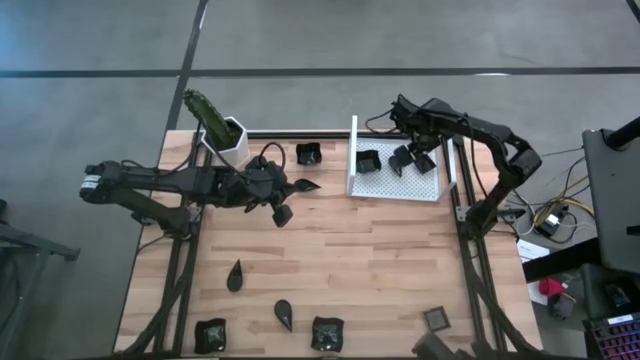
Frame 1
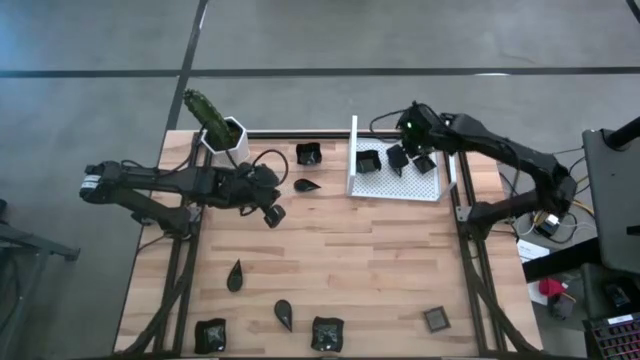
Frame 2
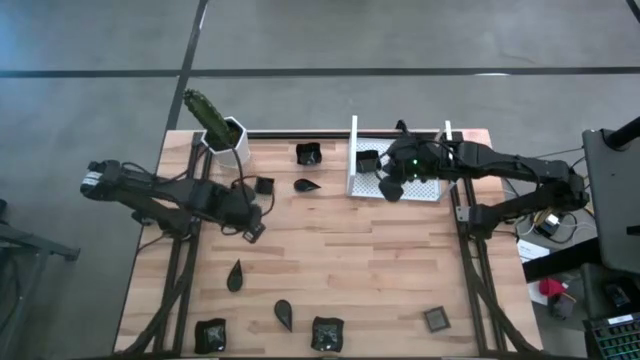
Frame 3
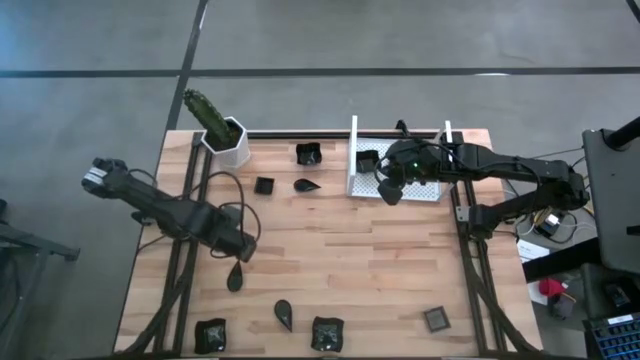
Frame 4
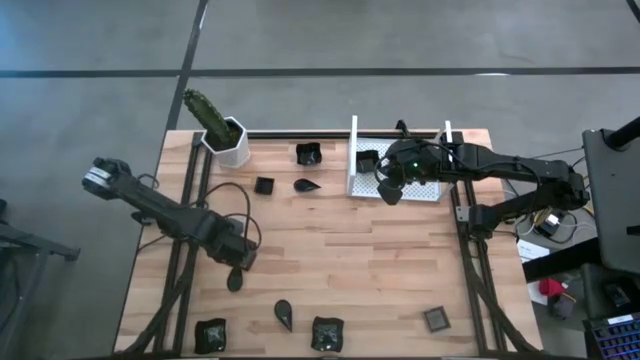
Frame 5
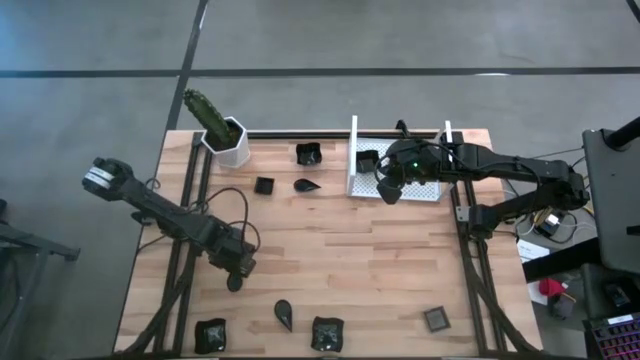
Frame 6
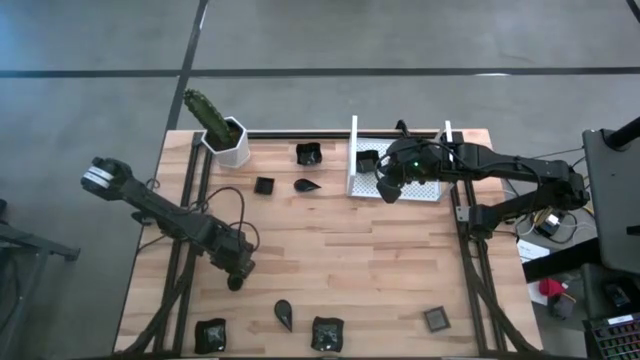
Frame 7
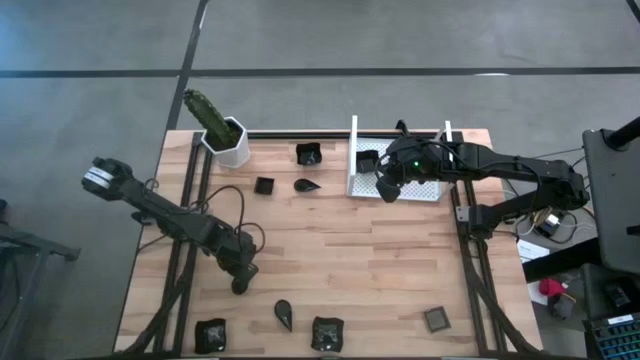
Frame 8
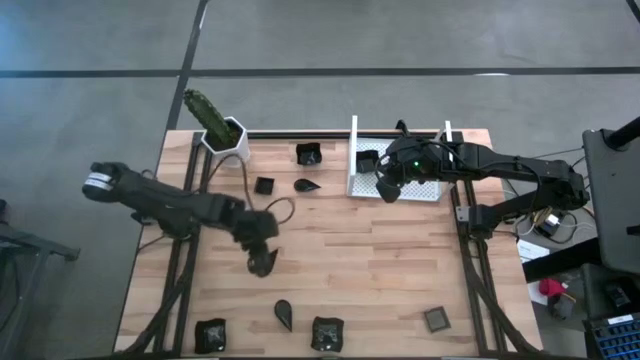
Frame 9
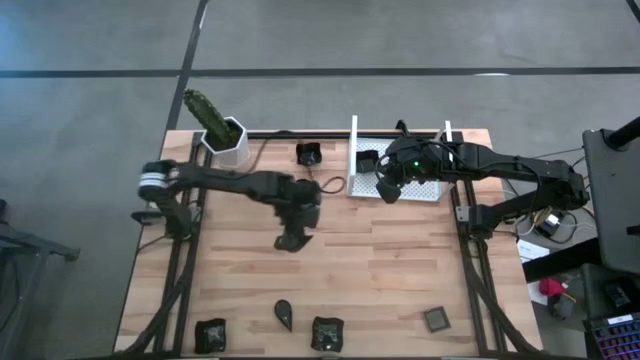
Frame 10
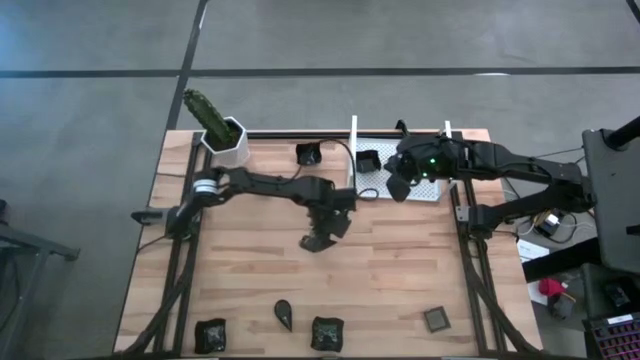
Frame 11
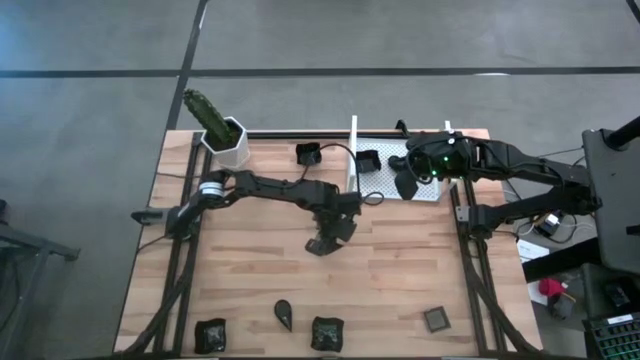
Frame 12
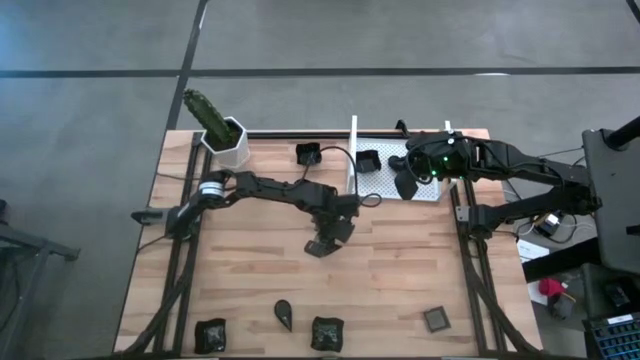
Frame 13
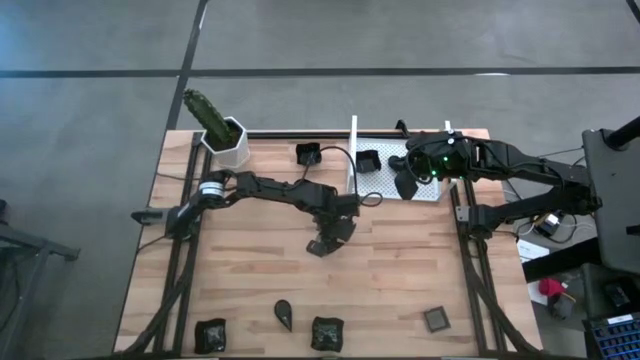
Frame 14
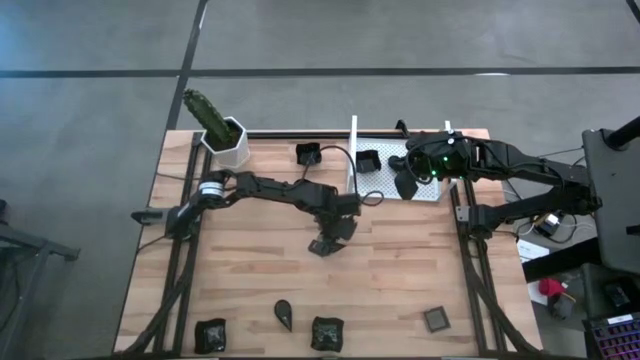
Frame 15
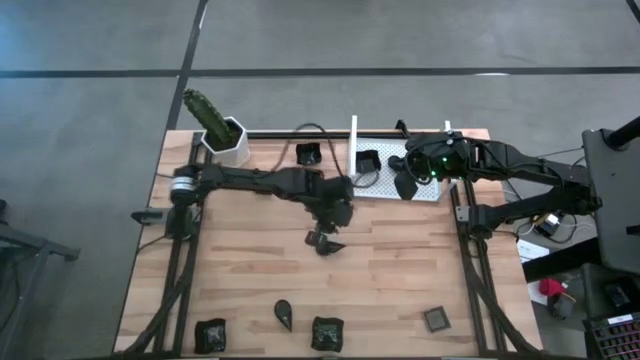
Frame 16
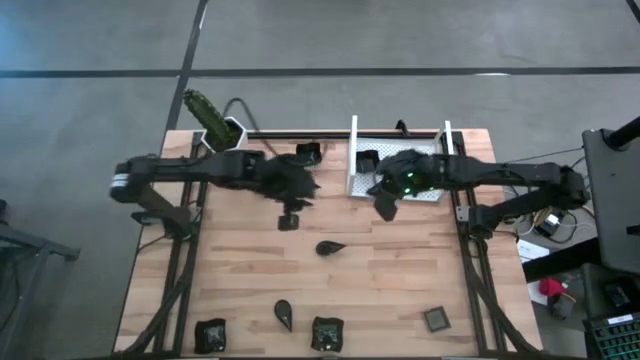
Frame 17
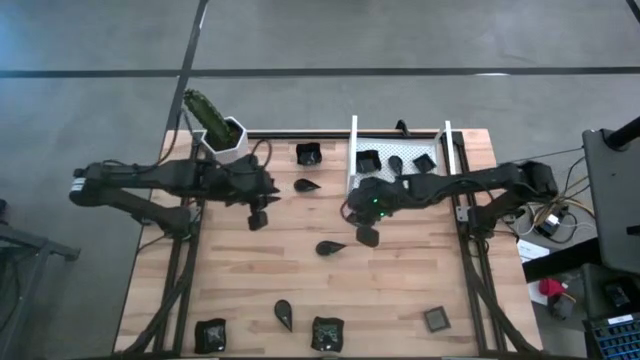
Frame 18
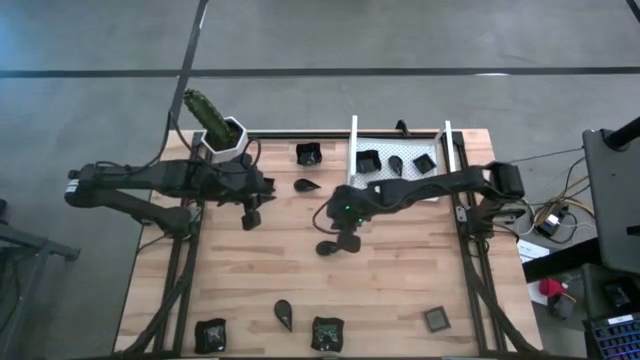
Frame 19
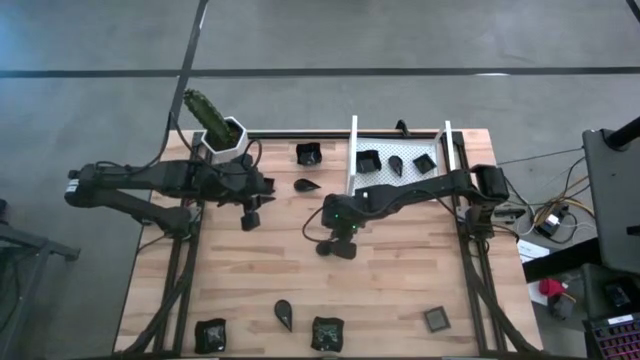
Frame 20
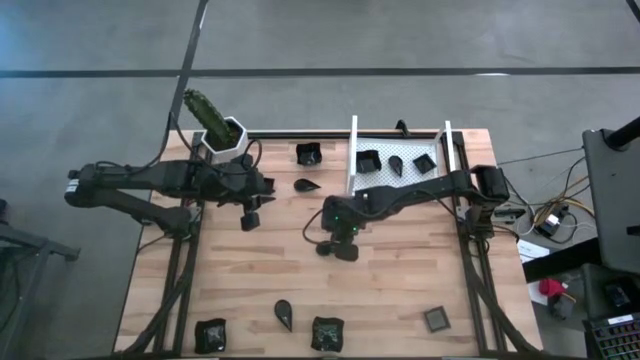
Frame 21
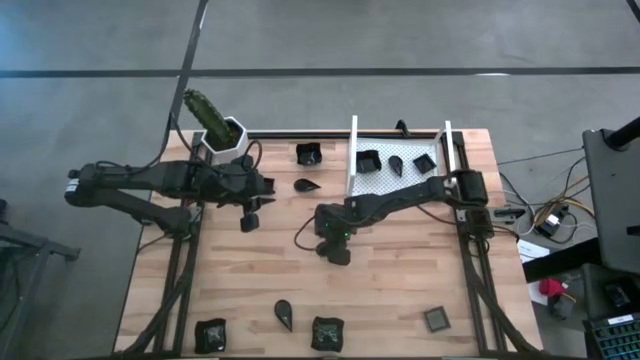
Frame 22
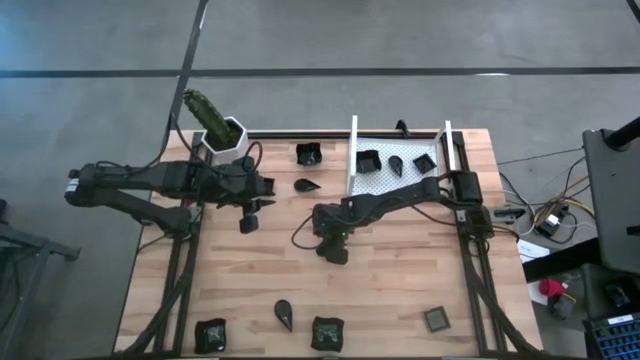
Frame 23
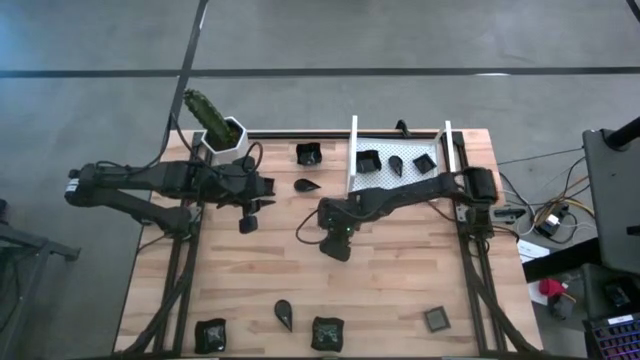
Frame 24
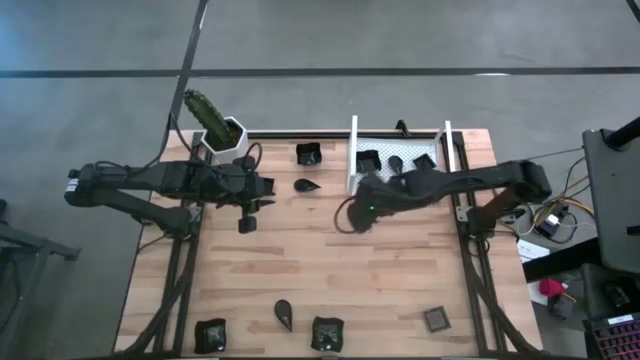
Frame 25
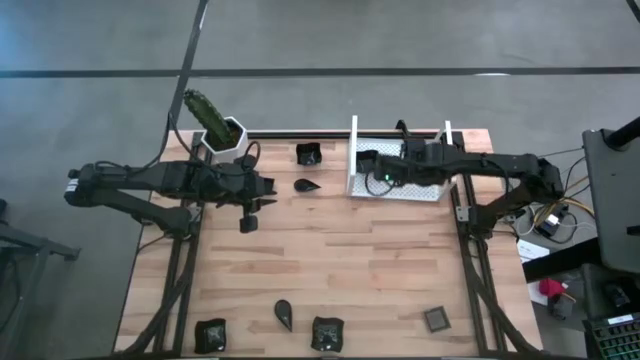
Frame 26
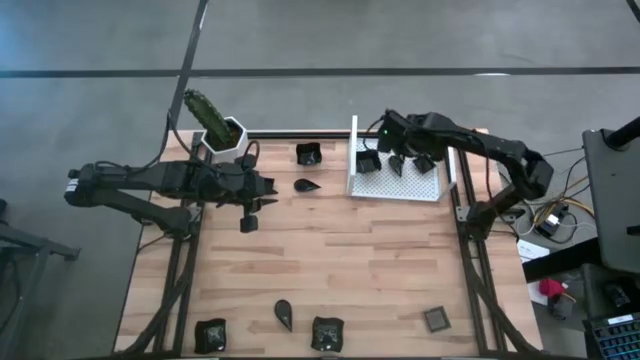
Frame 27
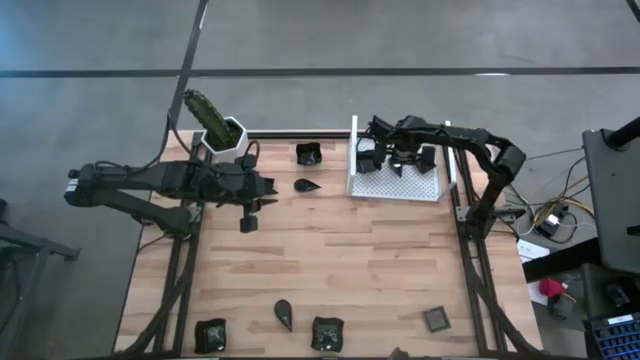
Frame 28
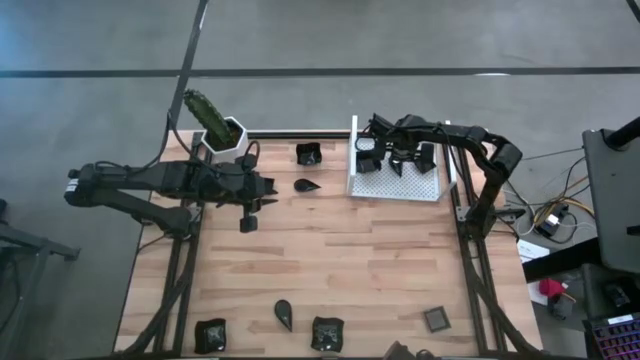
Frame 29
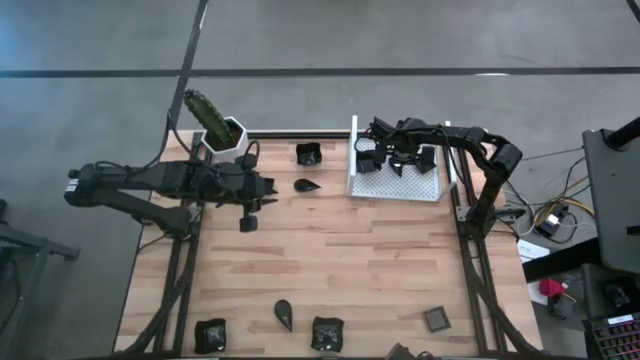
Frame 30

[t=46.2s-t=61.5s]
Task: Pick & Place Mini shaped plates
Stack the black drop shaped plate on top of the other black drop shaped plate on the shelf
